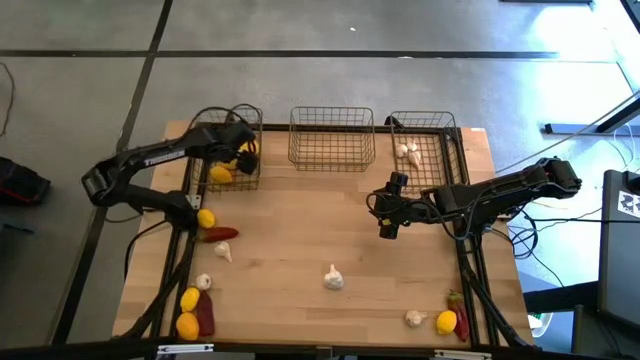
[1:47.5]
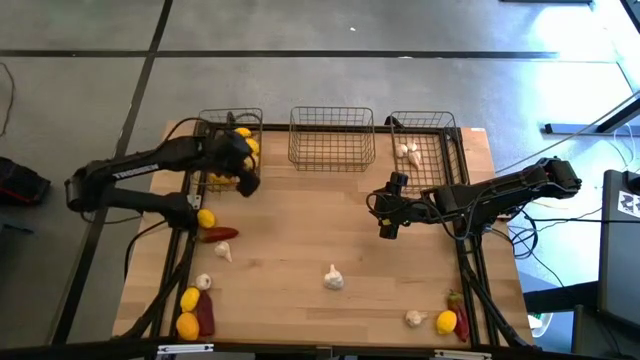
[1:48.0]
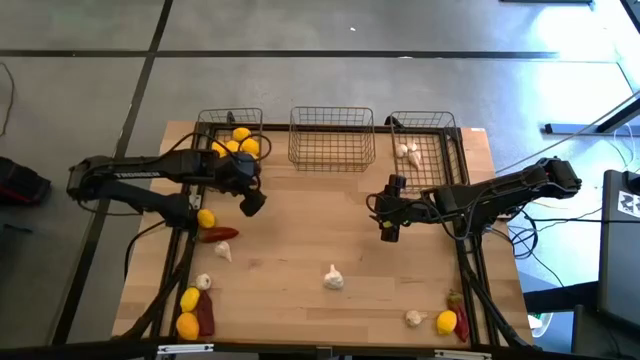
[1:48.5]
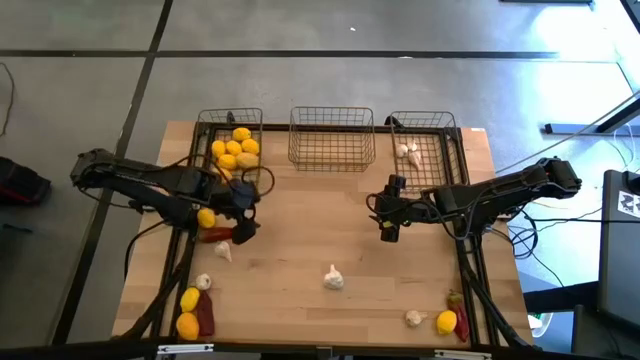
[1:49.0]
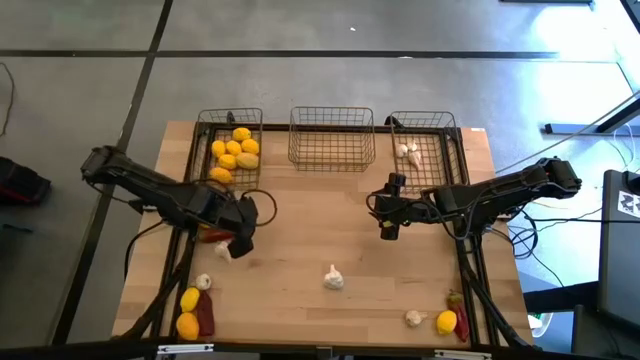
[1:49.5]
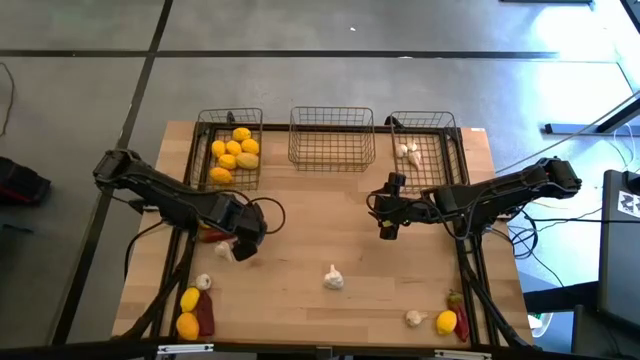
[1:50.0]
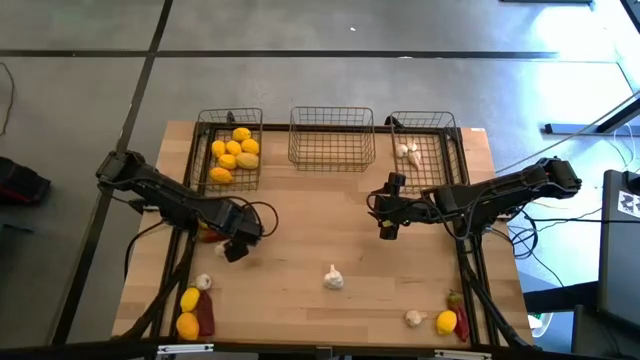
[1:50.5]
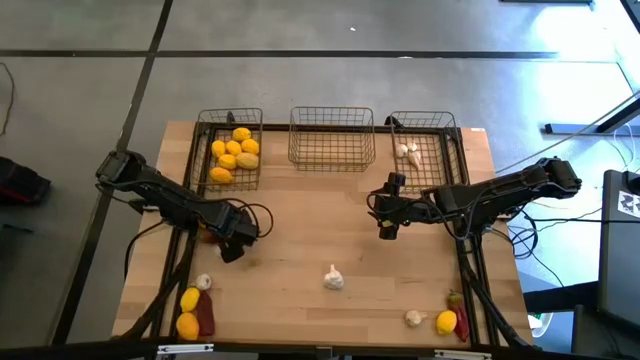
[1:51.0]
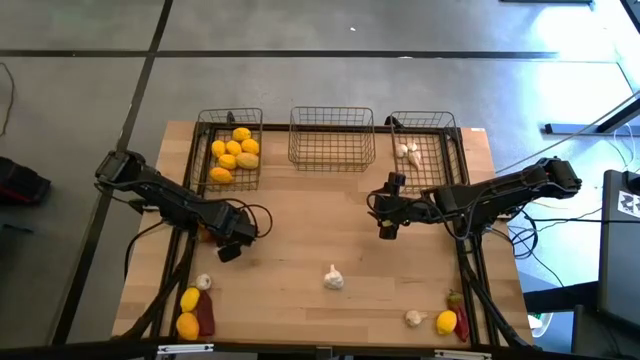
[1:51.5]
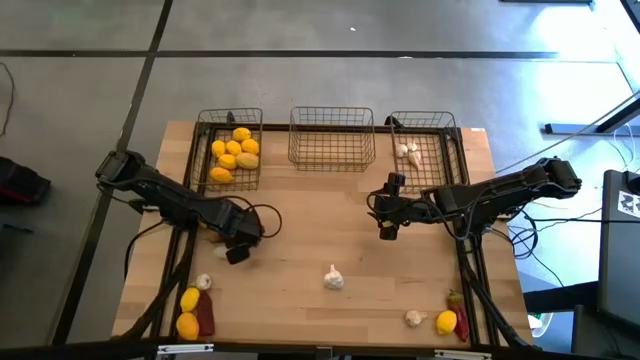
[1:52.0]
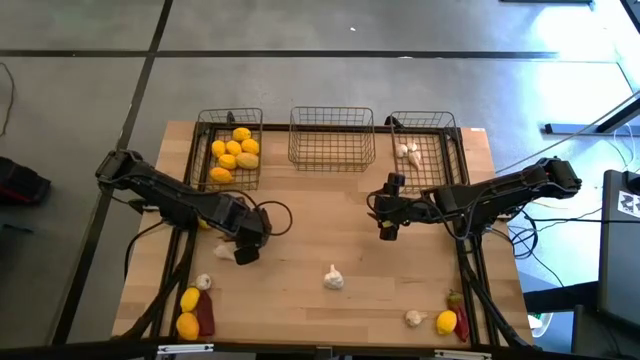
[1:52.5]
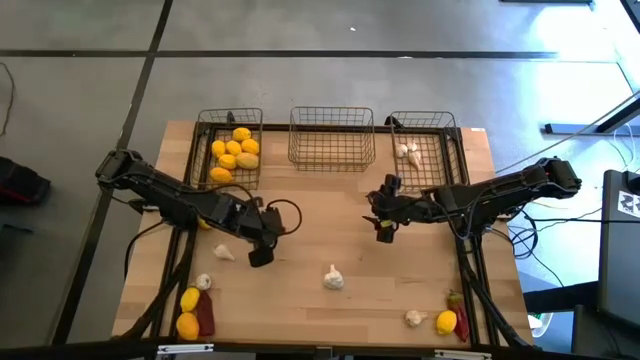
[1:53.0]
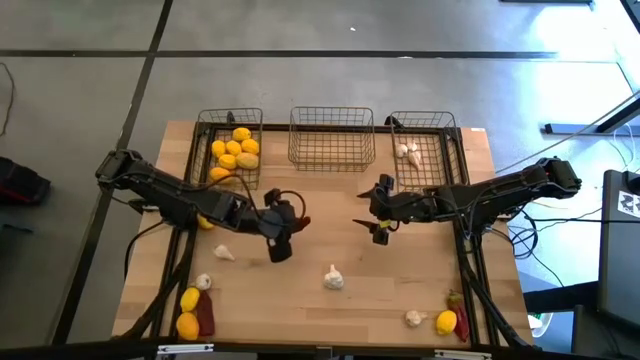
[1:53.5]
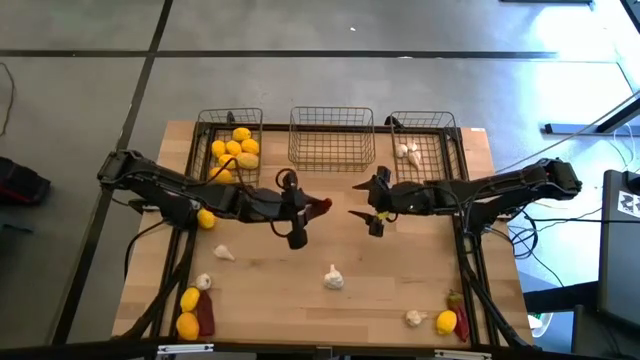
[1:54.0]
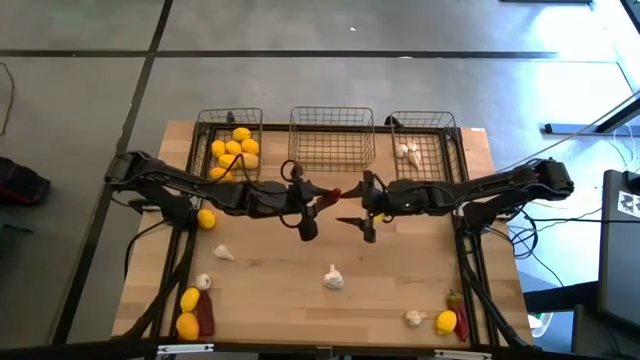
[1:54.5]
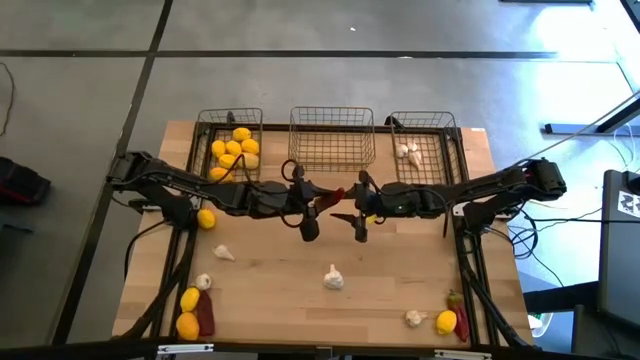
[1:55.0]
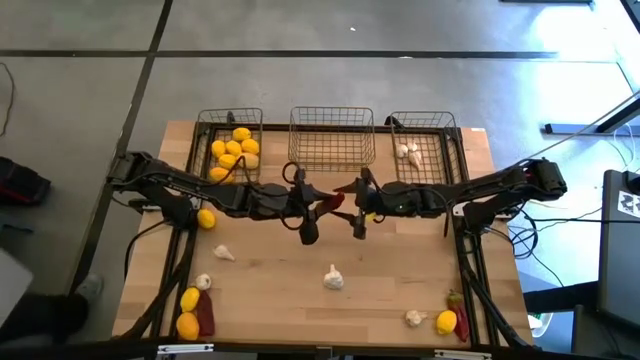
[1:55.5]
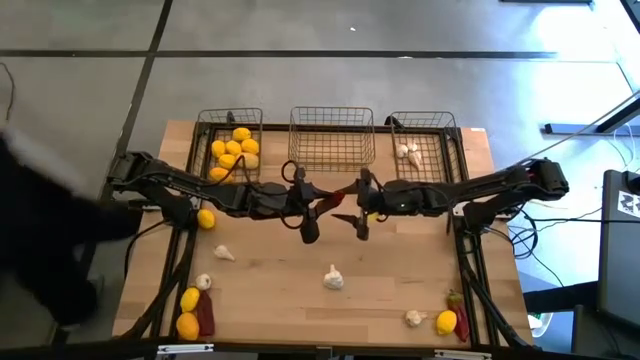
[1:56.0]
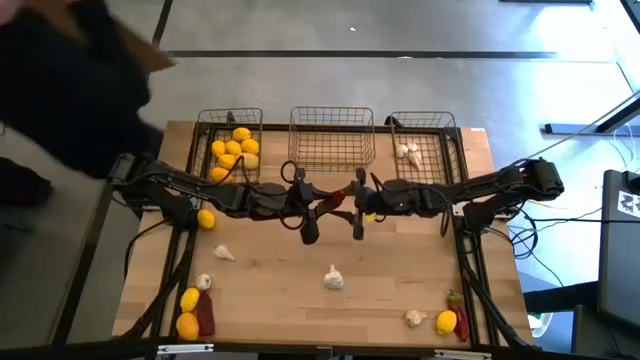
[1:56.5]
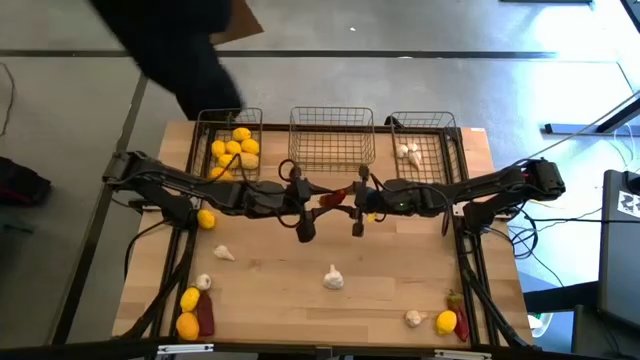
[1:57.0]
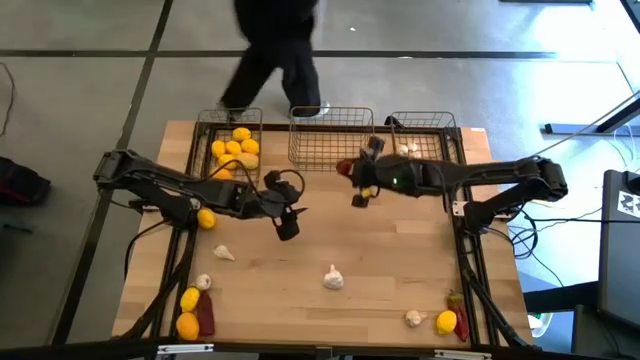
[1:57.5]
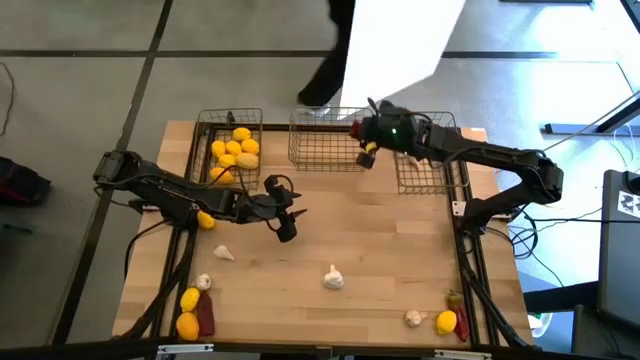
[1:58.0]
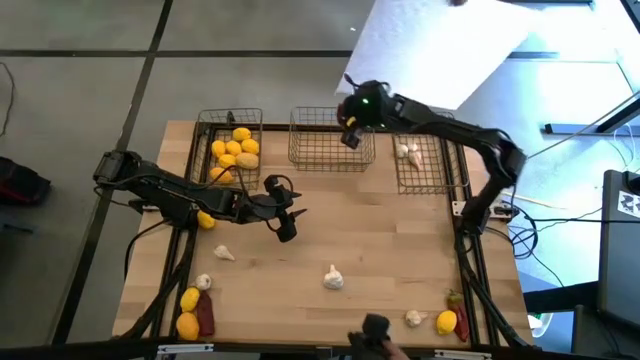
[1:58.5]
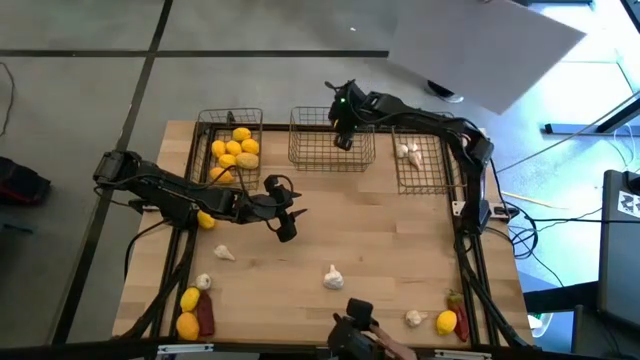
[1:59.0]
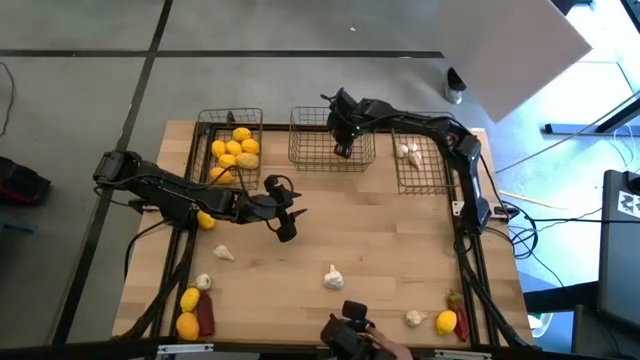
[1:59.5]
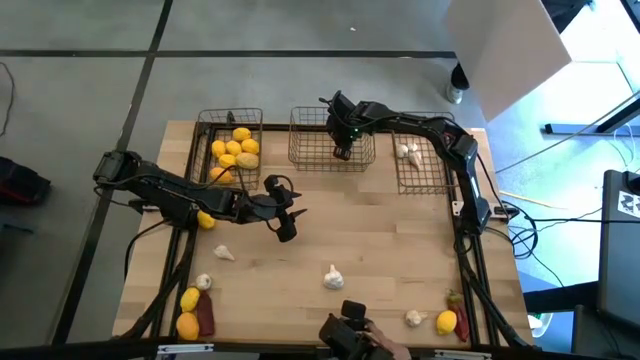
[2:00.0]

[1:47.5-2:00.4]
Task: Sort produce into baskets
Put the red chili pepper into the middle gold wire basket

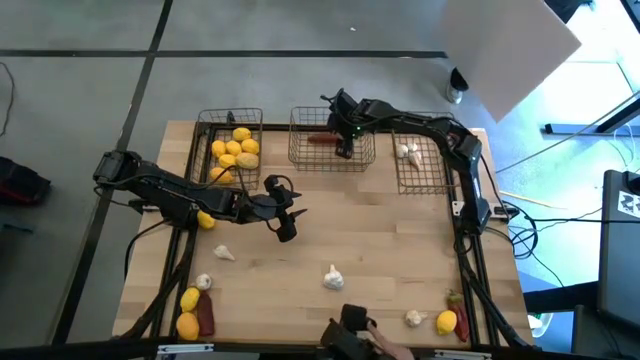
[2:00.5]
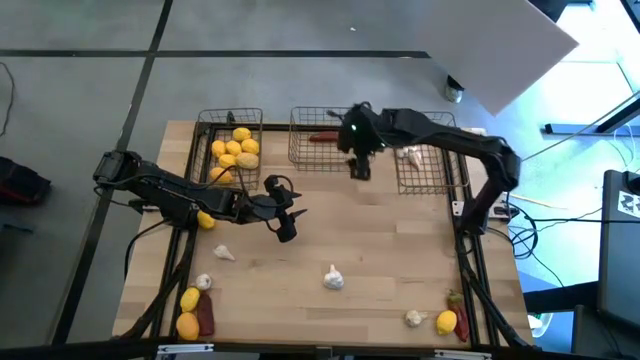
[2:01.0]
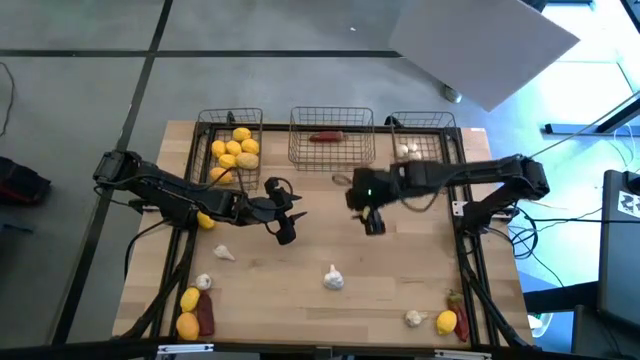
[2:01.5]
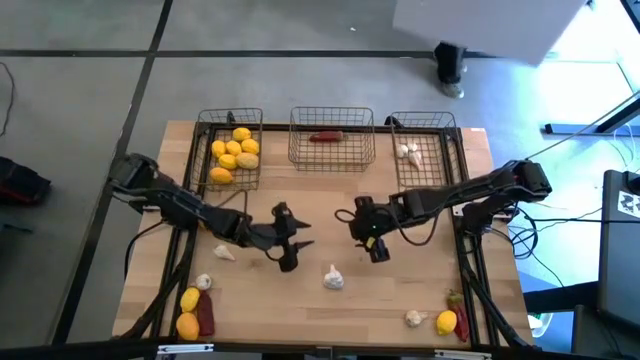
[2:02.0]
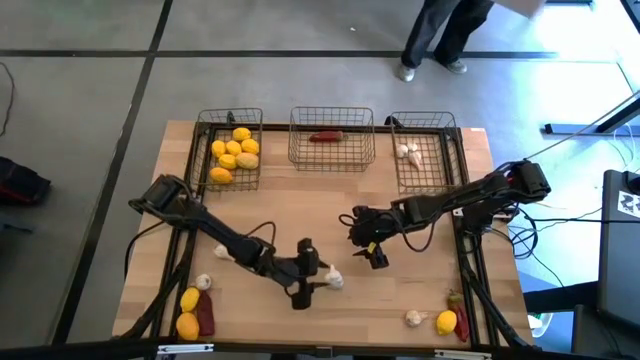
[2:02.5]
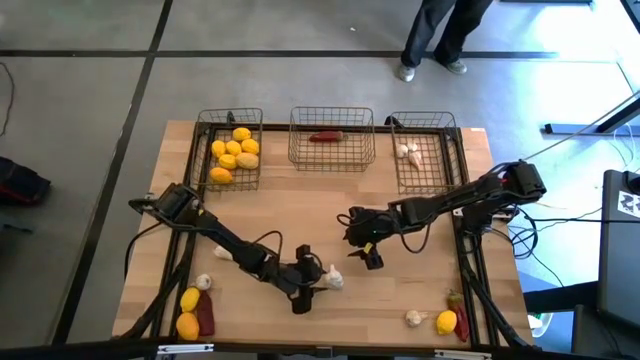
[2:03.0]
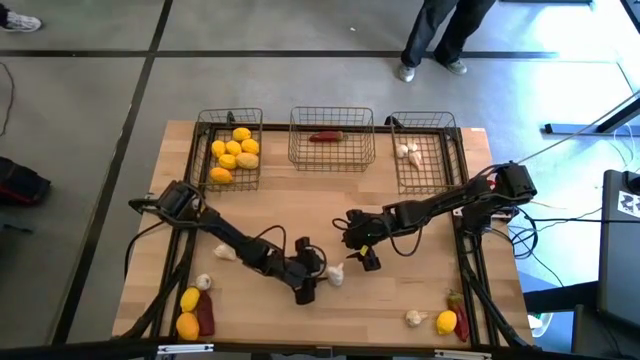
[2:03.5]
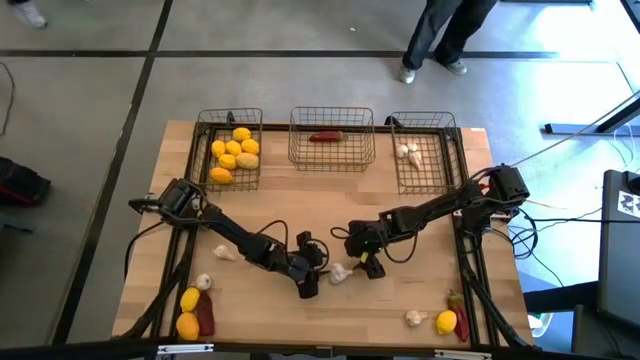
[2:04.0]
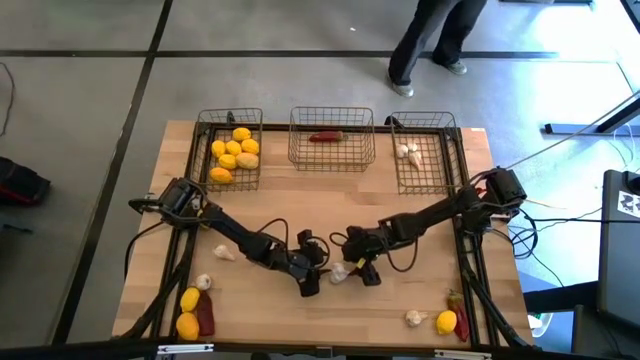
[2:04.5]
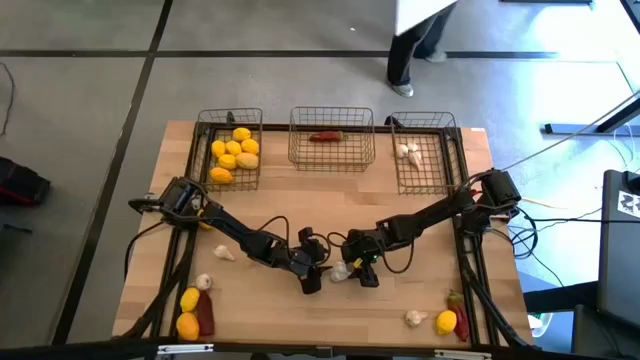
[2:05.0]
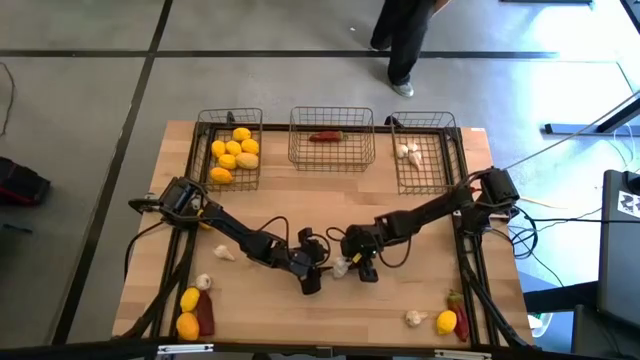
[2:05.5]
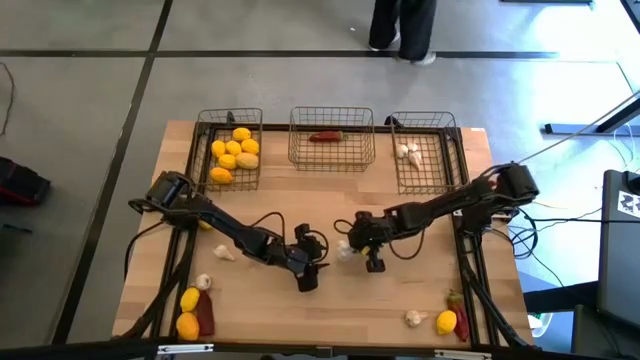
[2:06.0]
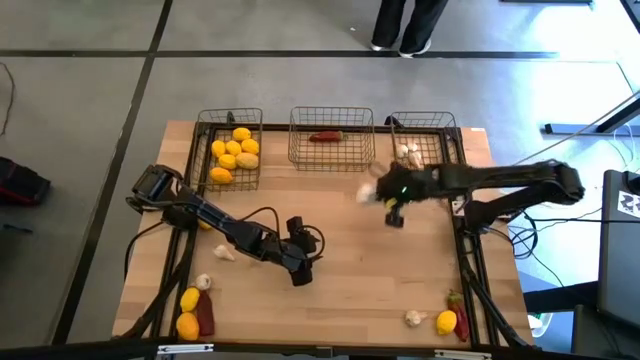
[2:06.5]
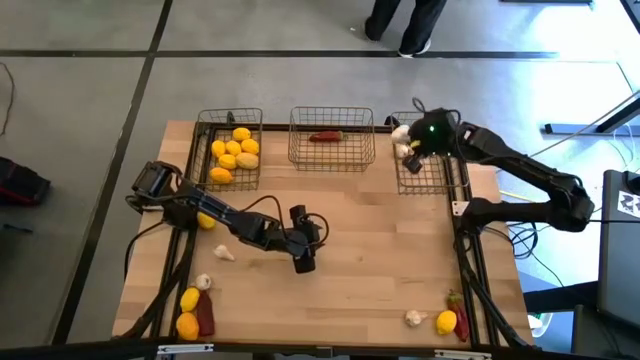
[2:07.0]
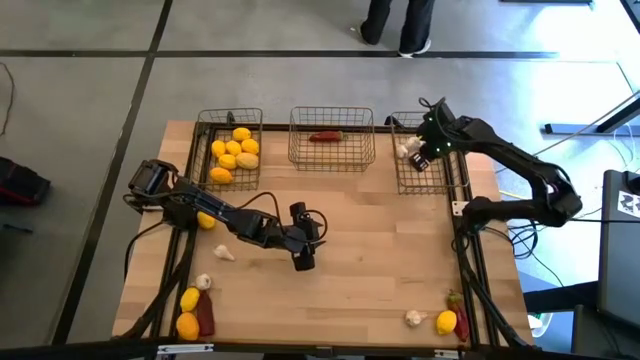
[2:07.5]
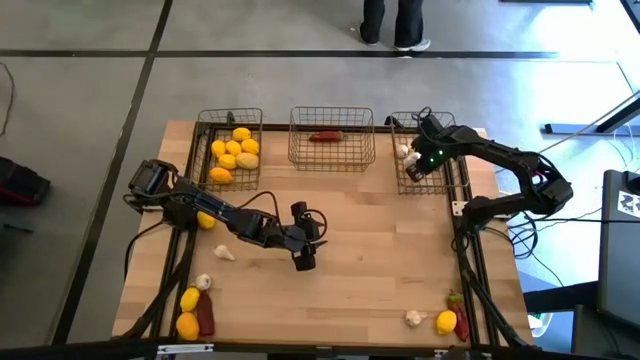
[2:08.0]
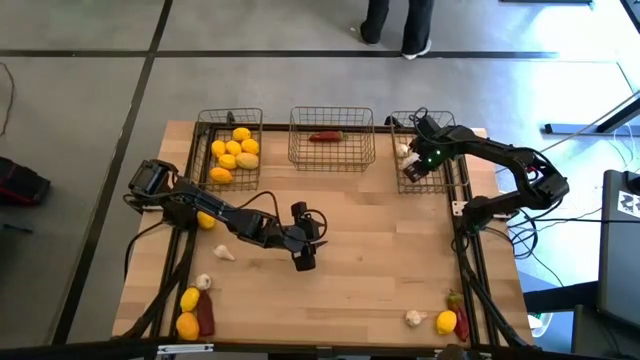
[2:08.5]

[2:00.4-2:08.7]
Put the white garlic into the right gold wire basket
